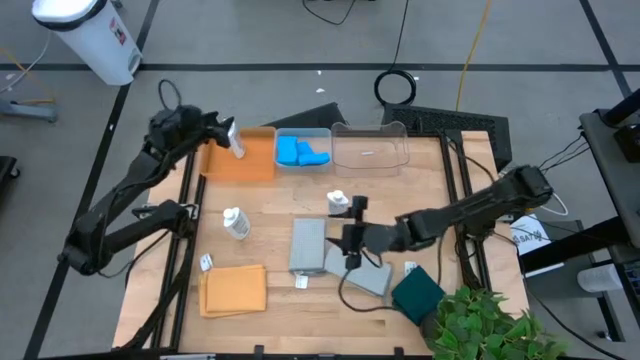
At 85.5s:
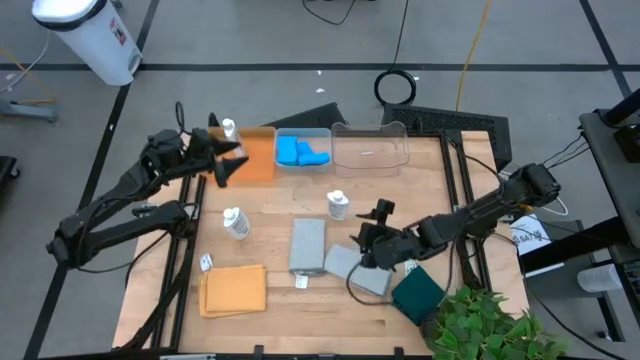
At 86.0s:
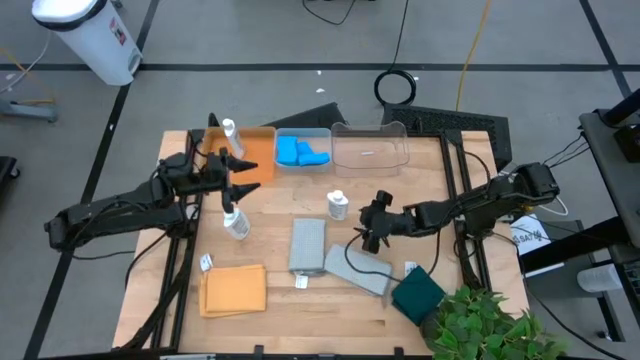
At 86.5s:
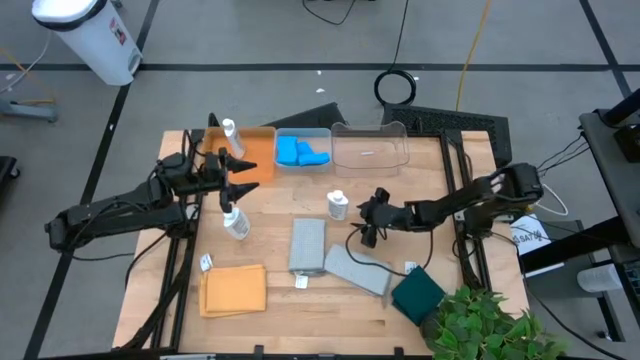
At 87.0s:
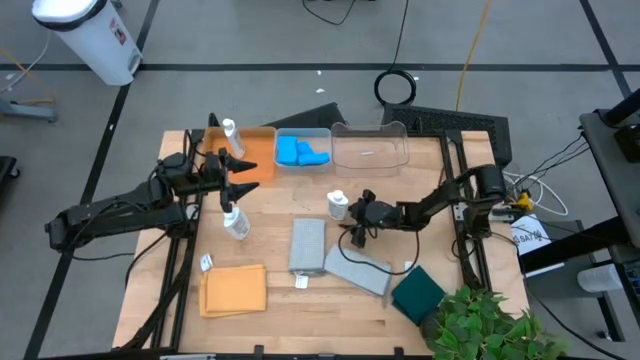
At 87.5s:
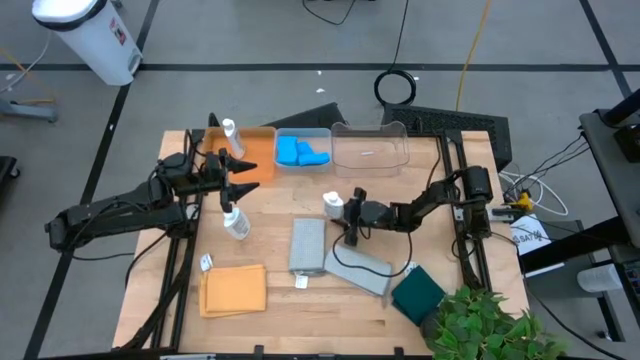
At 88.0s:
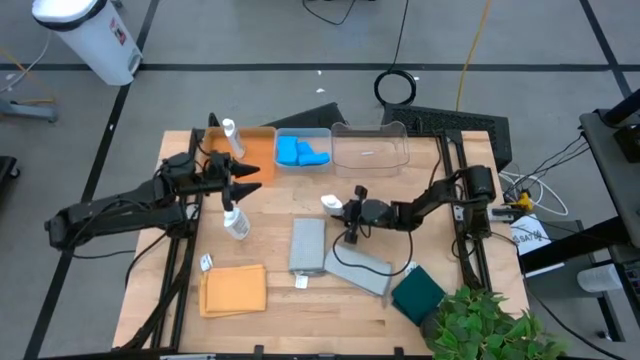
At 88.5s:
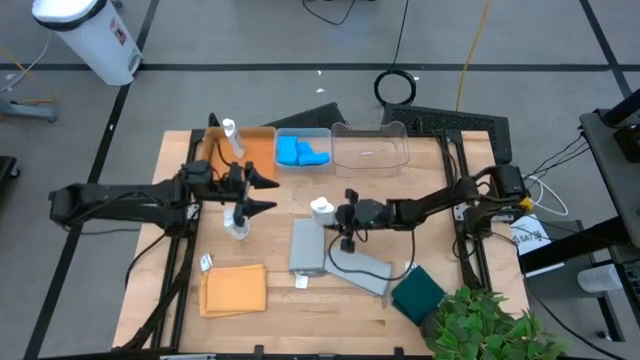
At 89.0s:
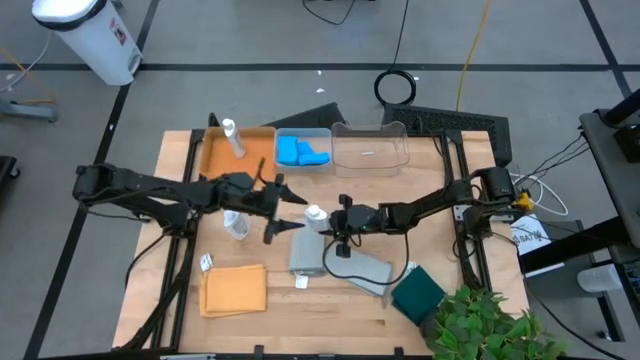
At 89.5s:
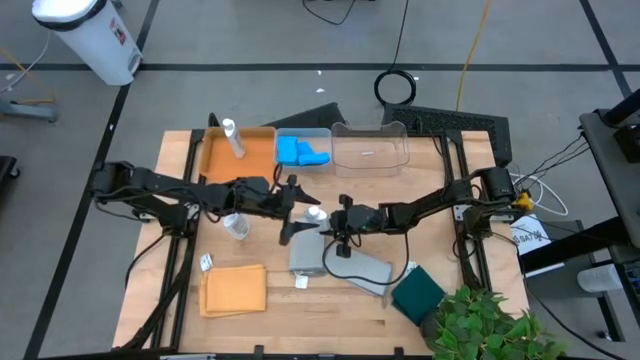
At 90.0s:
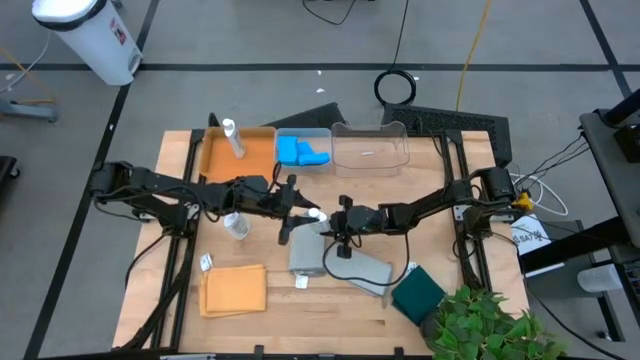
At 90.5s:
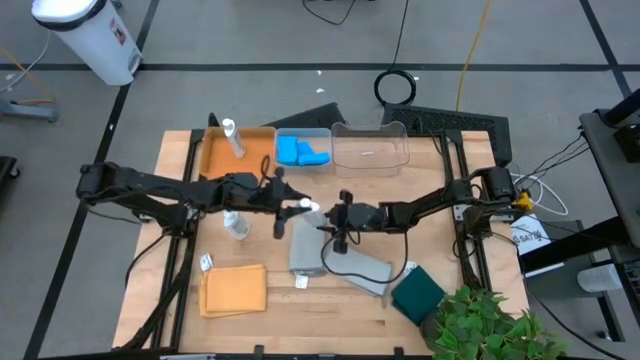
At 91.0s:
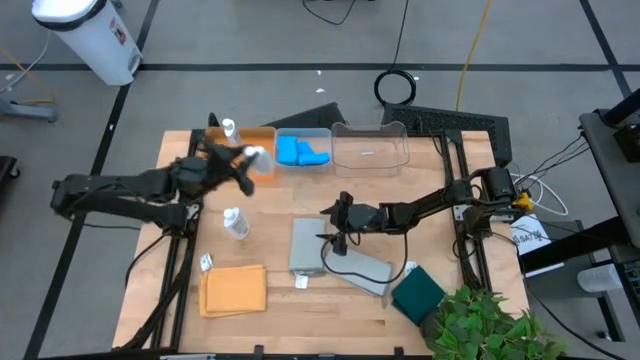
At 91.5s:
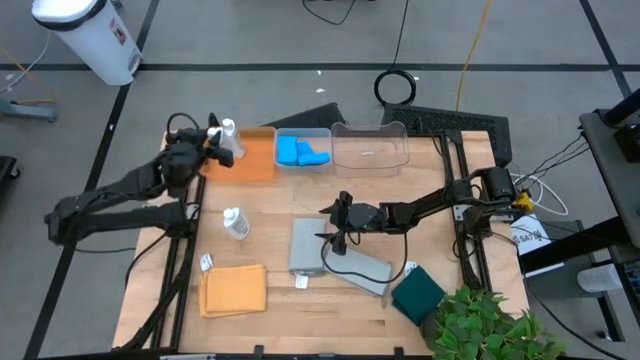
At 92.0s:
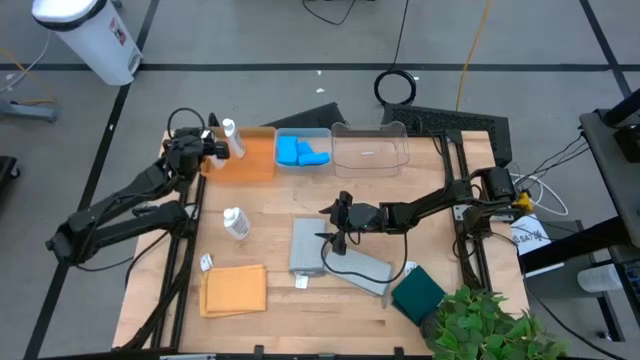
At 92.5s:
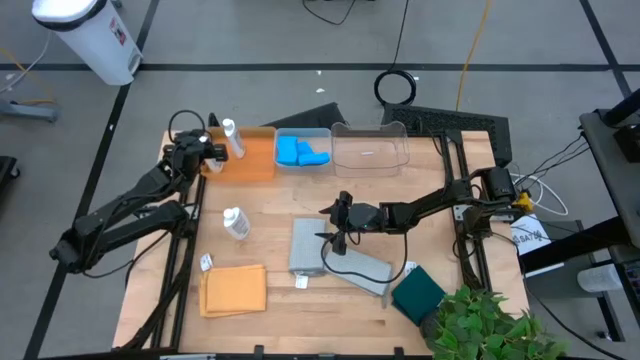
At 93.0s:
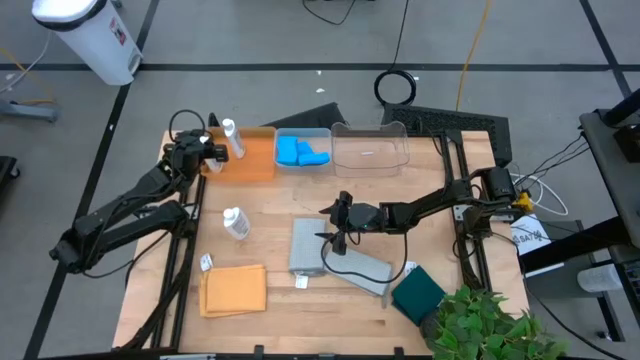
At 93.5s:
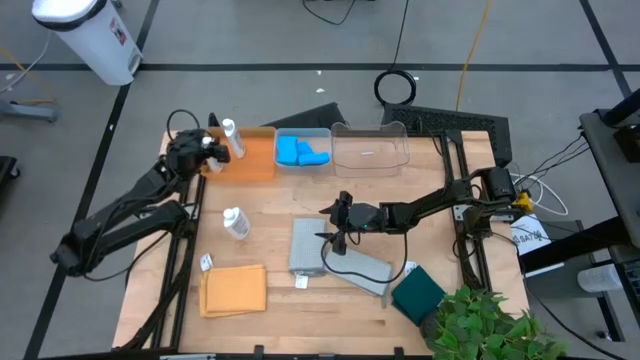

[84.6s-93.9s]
Task: Pick & Place Kitchen Items
Put the white plastic restorer bottle into the orange bin

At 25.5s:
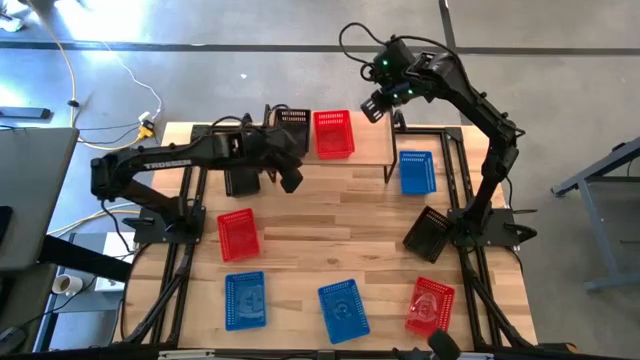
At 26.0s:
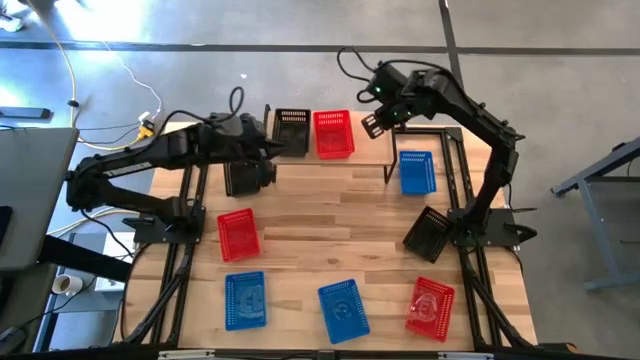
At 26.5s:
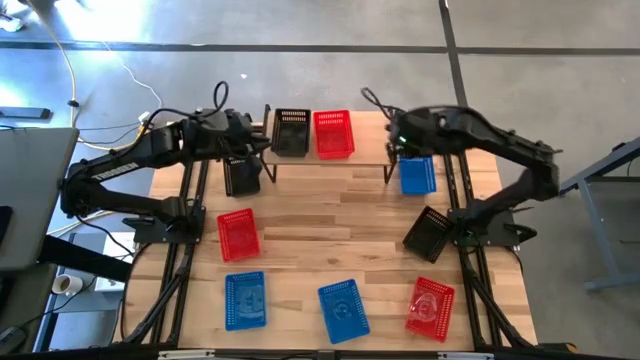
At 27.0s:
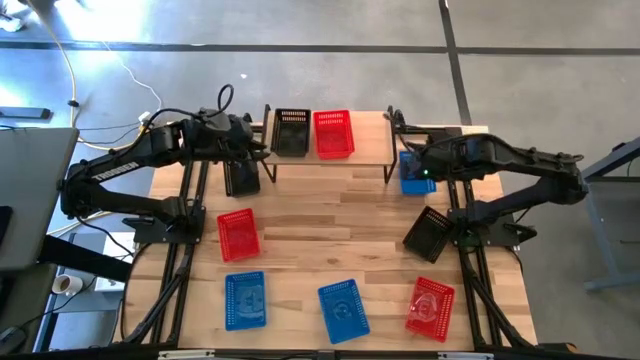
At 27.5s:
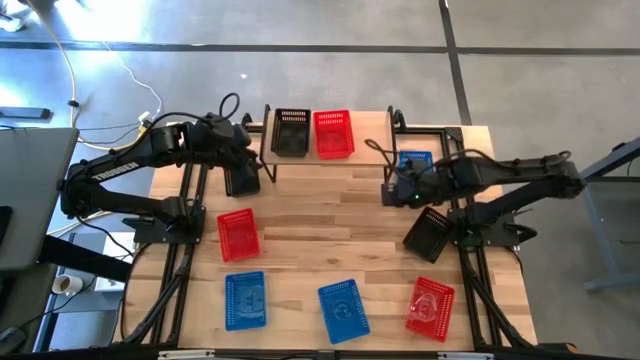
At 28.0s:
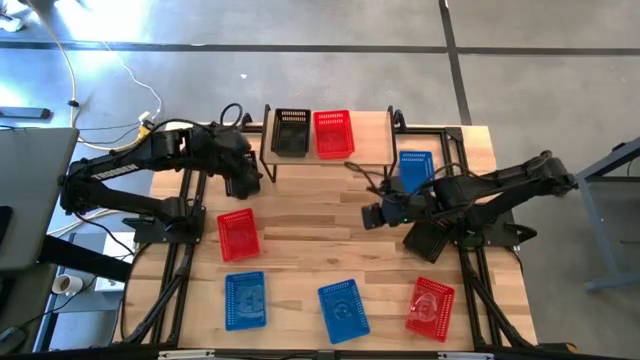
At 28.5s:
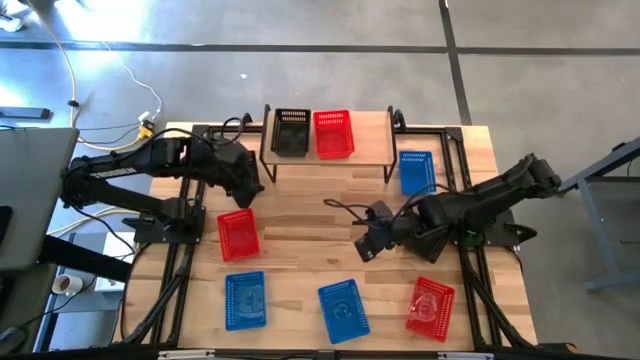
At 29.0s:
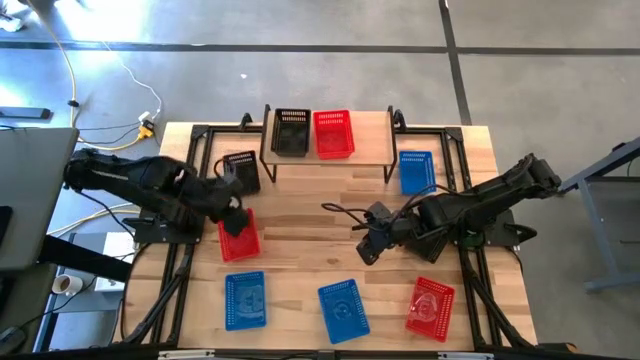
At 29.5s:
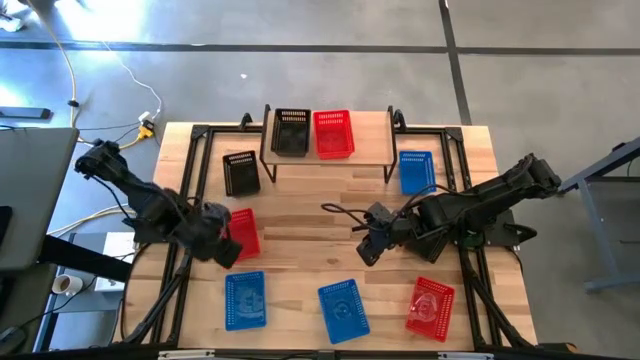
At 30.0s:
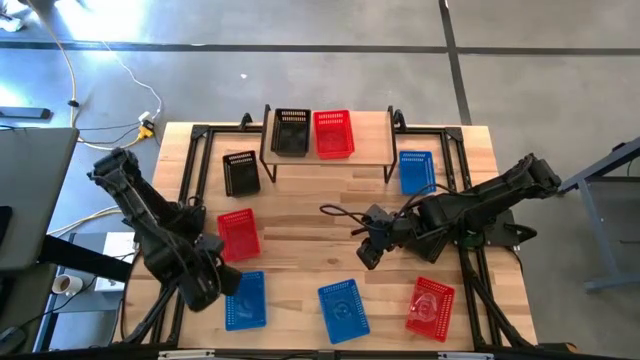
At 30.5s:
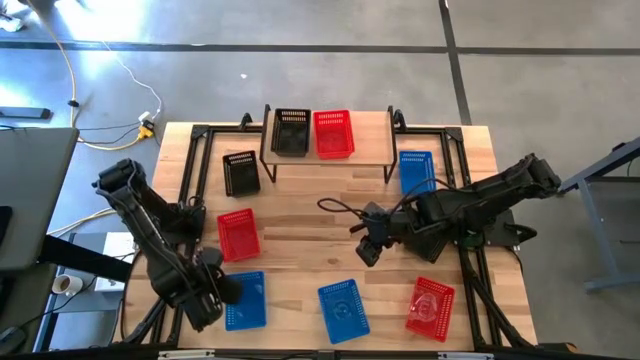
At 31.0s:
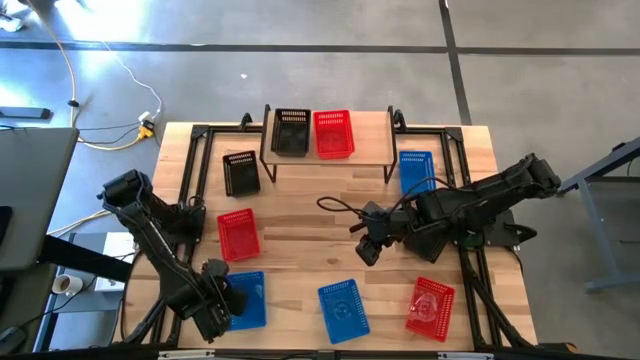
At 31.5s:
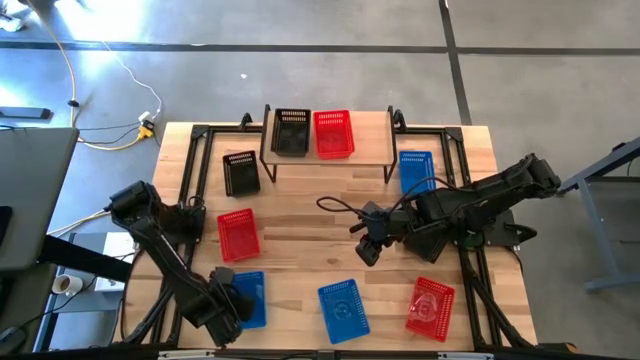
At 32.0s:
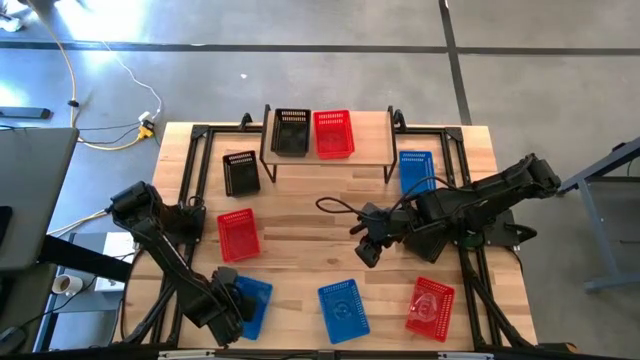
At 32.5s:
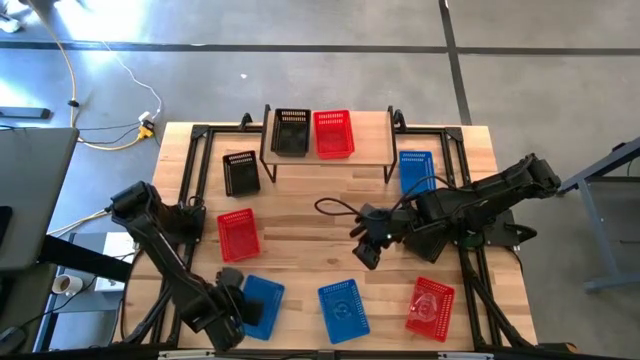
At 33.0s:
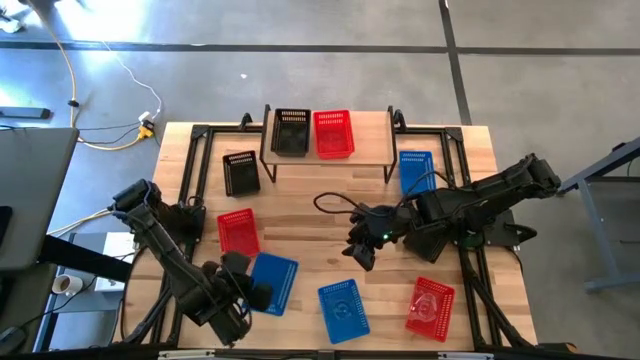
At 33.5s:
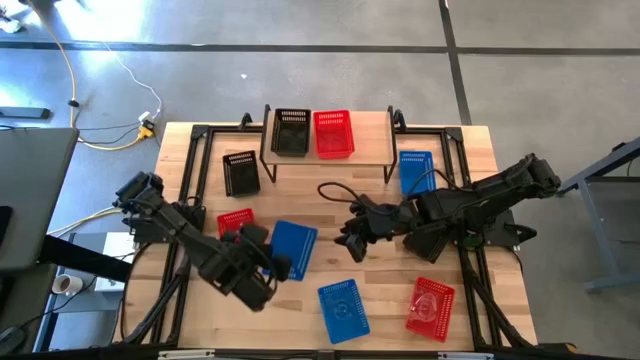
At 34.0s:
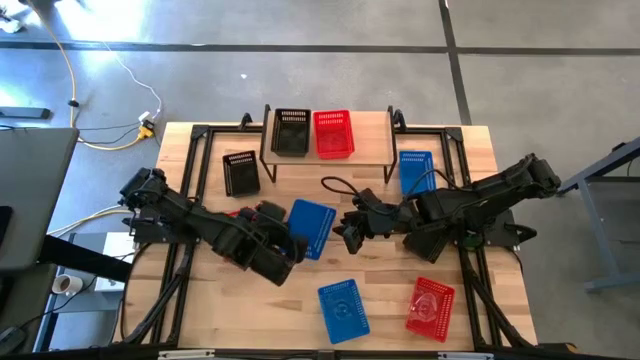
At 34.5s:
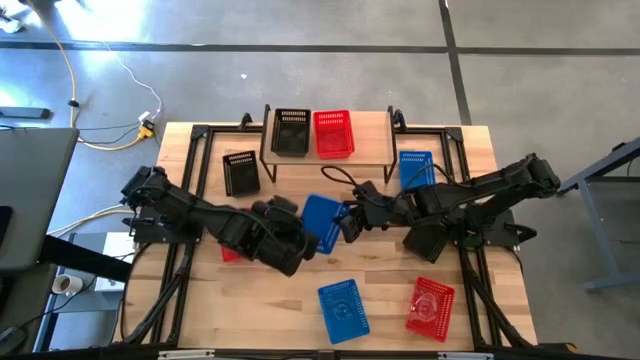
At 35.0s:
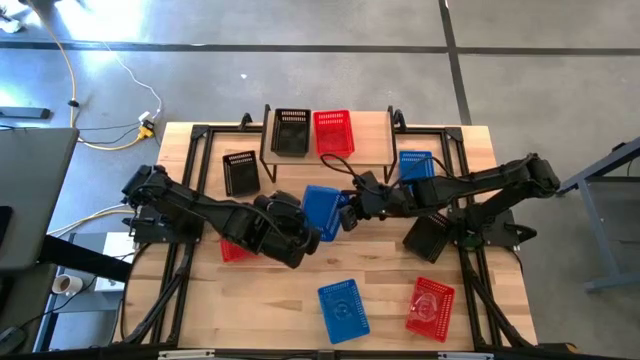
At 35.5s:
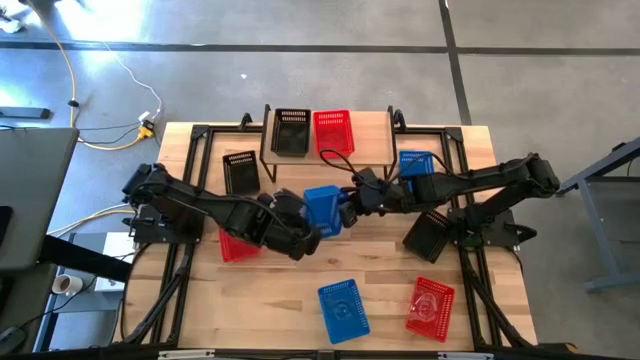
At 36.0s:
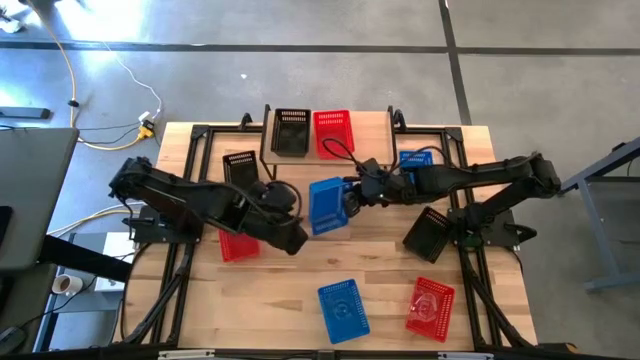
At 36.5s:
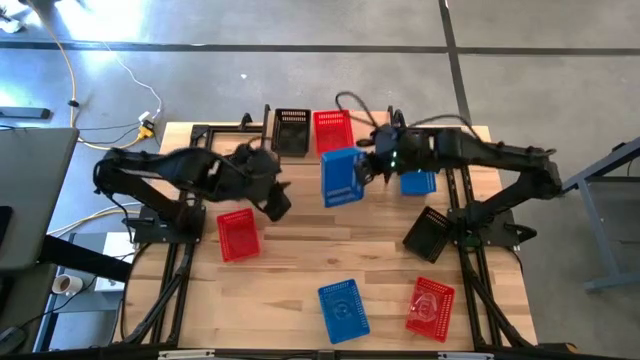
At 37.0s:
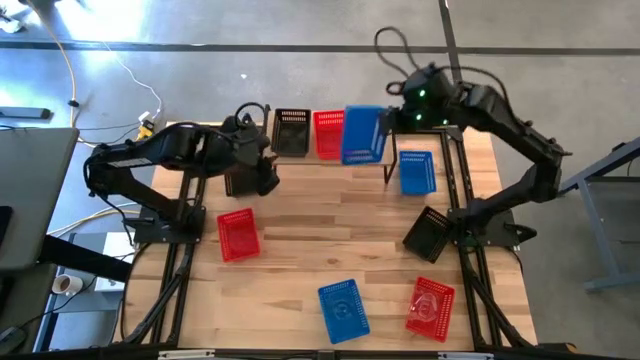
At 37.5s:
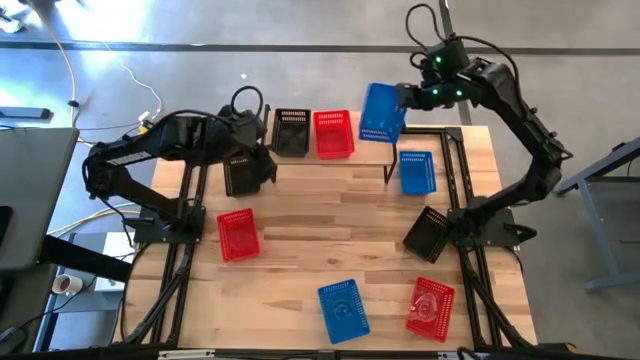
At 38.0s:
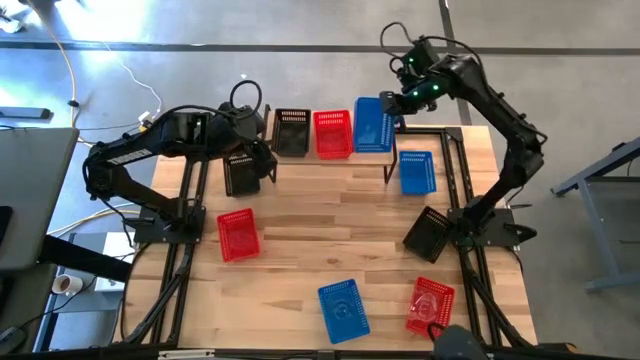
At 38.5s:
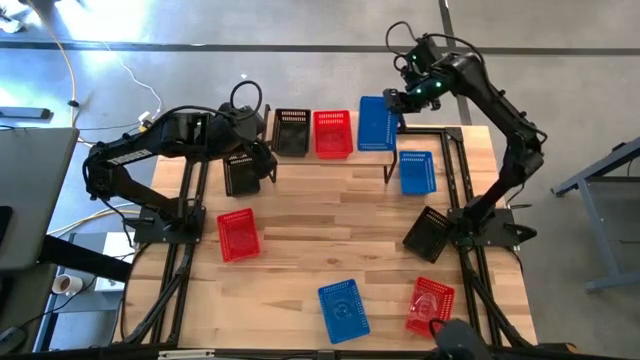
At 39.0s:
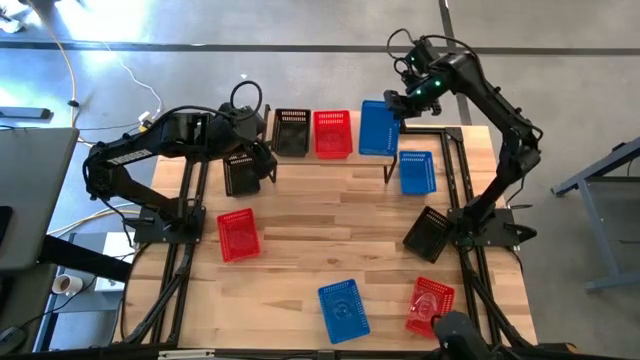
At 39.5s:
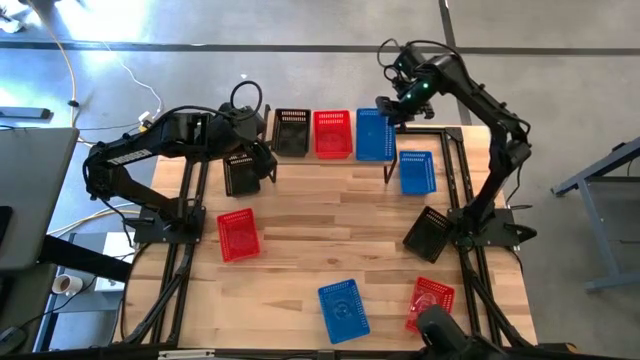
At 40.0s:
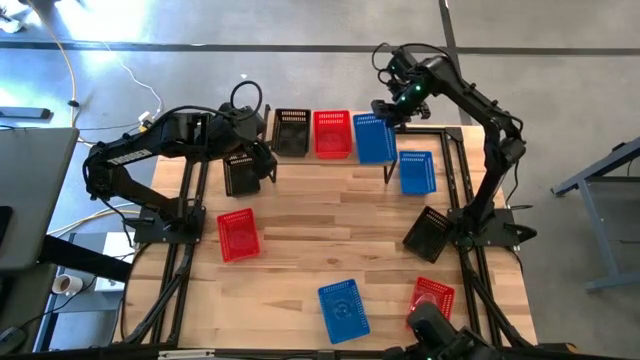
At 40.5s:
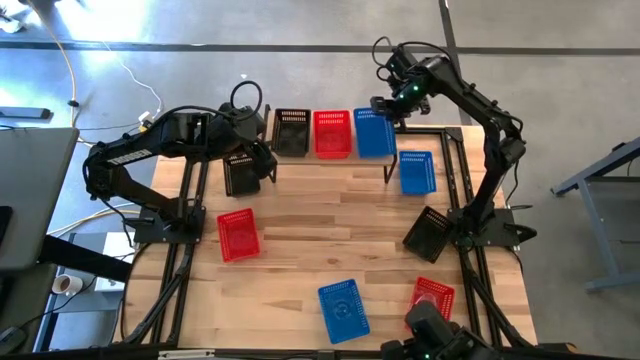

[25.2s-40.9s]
Task: Stack baskets on shelf by color
Put the bottom left blue bin on the shelf
